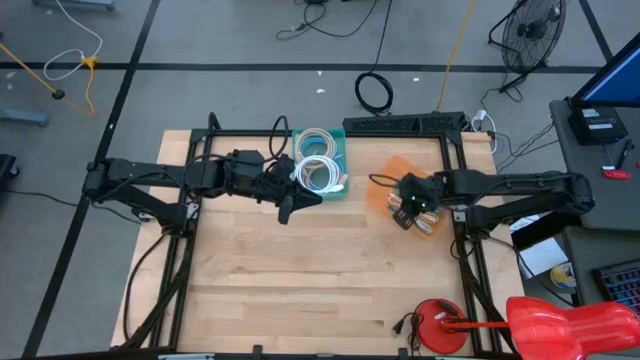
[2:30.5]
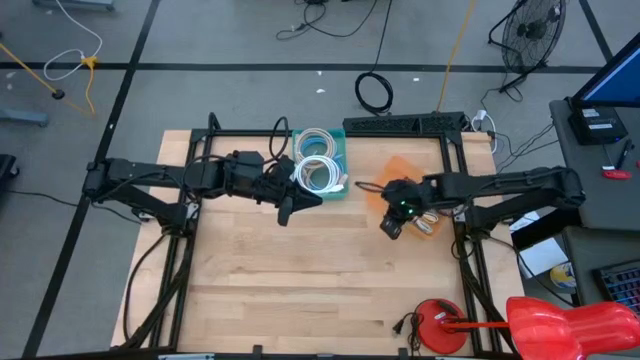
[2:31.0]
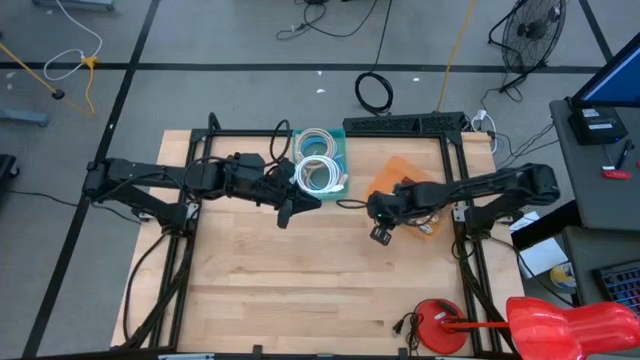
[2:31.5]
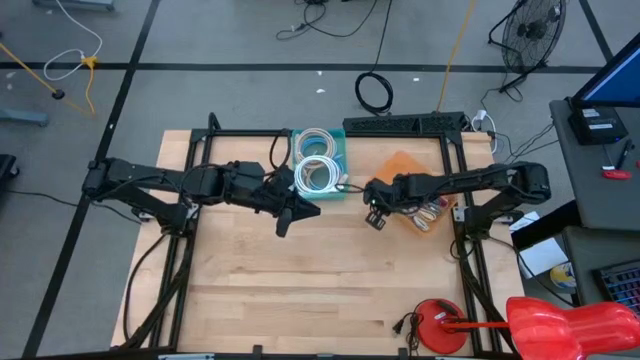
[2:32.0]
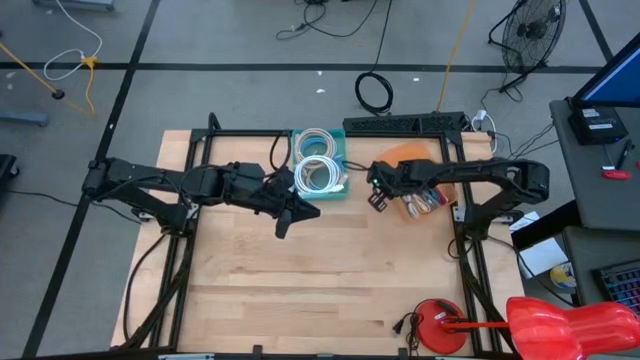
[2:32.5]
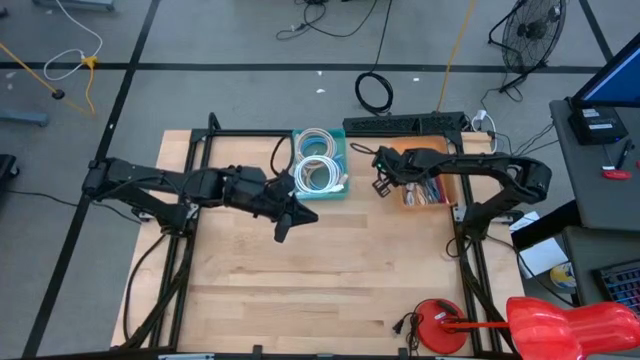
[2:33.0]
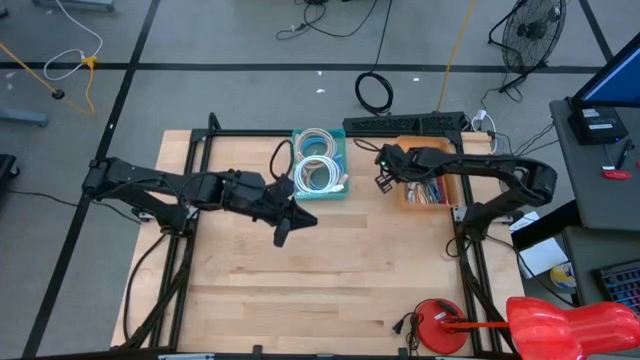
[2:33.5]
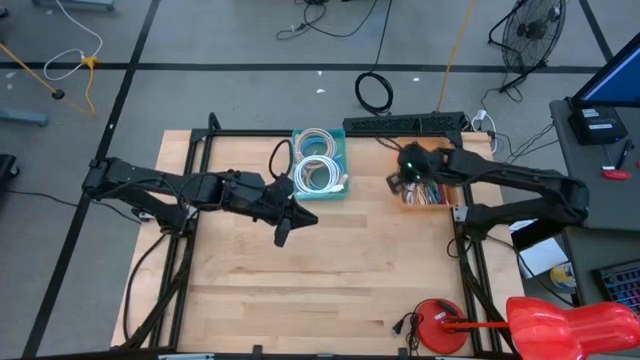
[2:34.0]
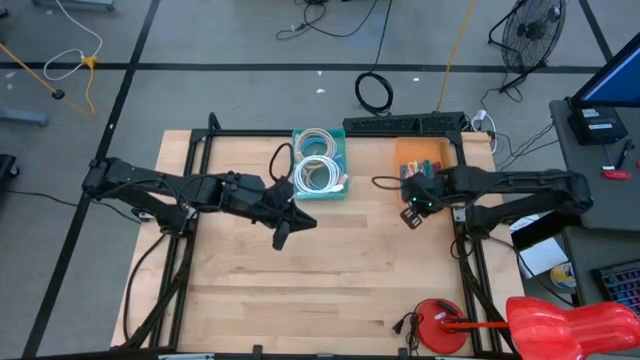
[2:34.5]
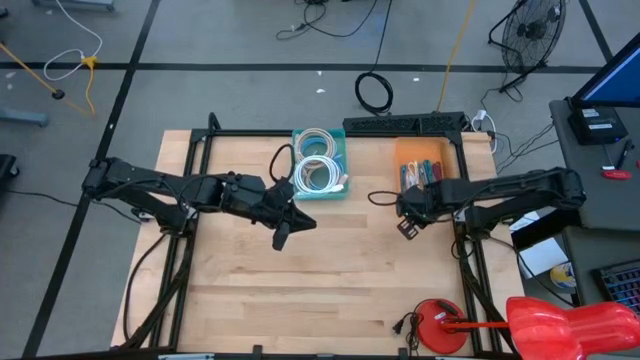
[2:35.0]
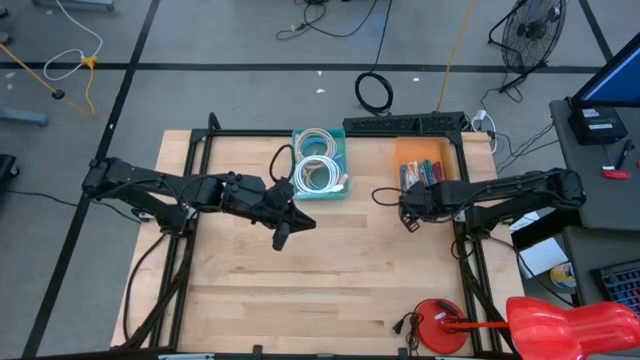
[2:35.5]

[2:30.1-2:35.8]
Task: Pick & Place USB Port
Adjust the orange bin

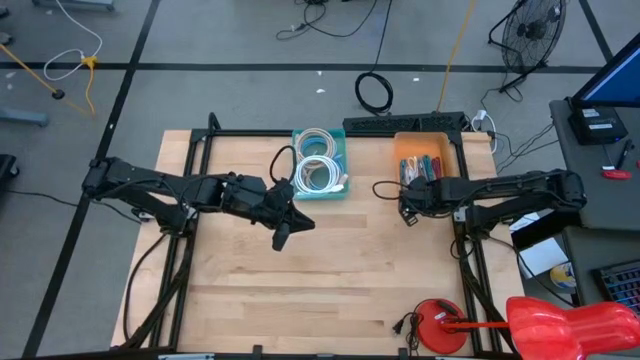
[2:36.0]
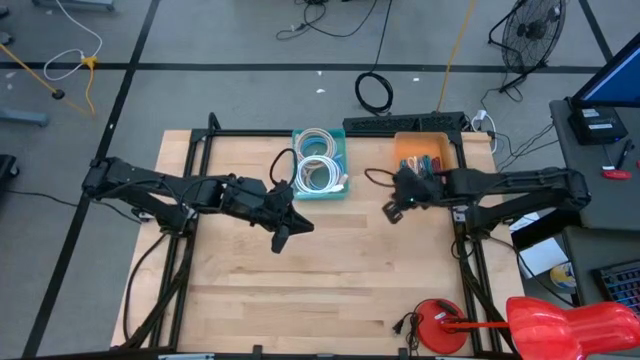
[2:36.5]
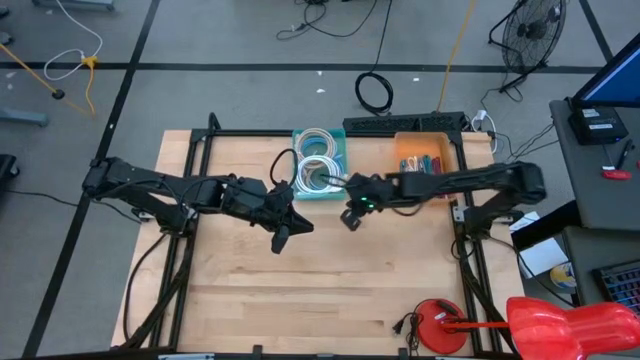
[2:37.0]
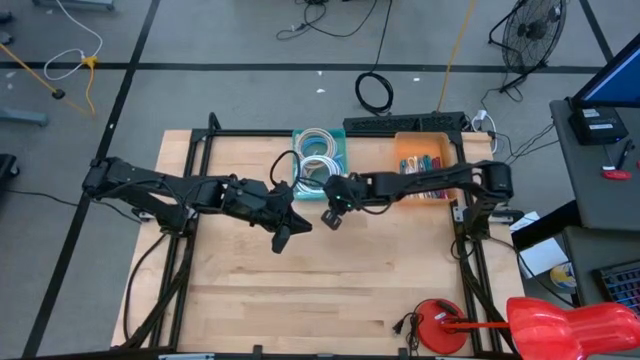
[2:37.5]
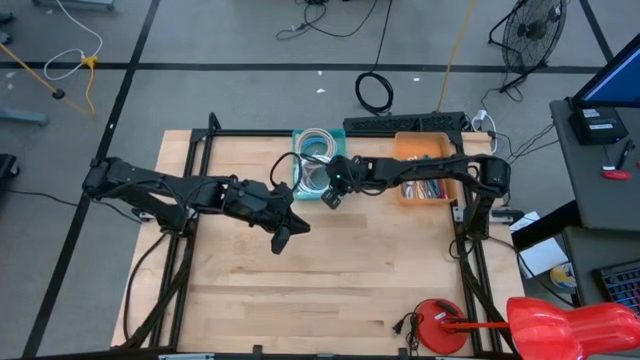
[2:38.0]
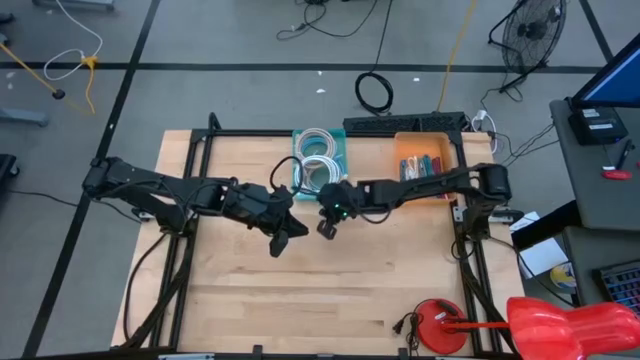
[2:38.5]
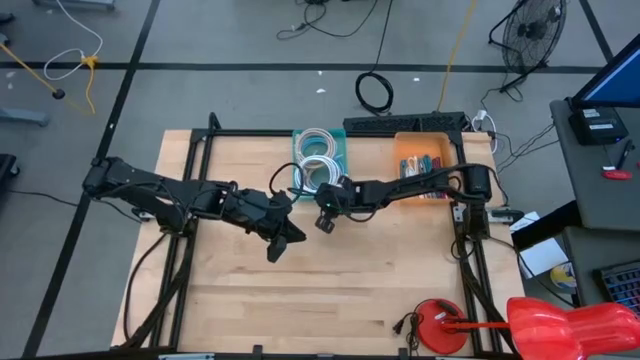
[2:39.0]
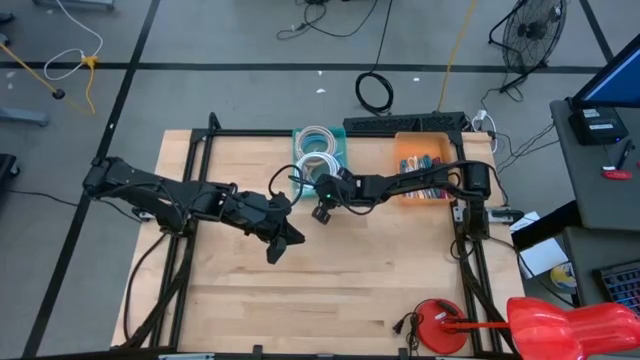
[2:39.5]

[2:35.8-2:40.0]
Adjust the green bin

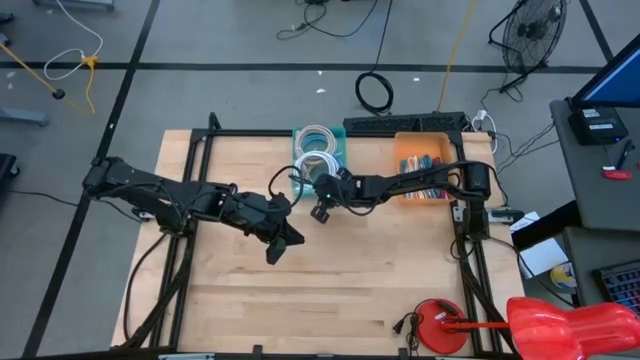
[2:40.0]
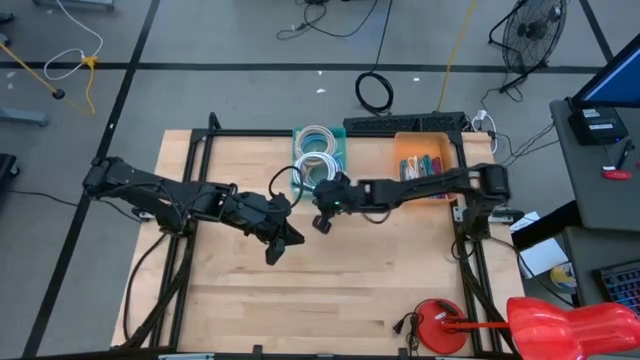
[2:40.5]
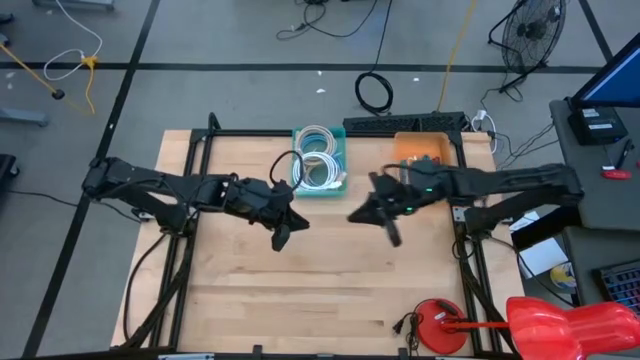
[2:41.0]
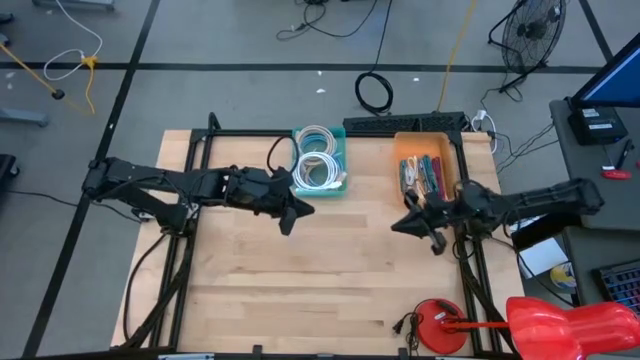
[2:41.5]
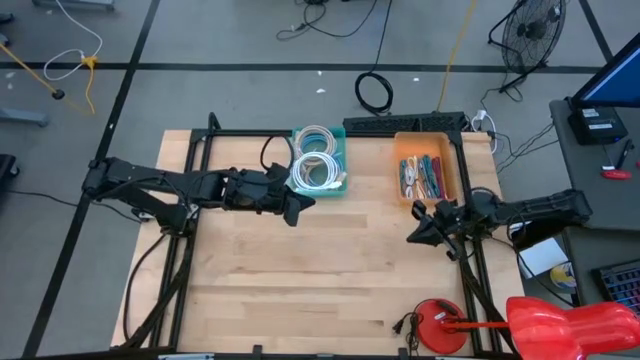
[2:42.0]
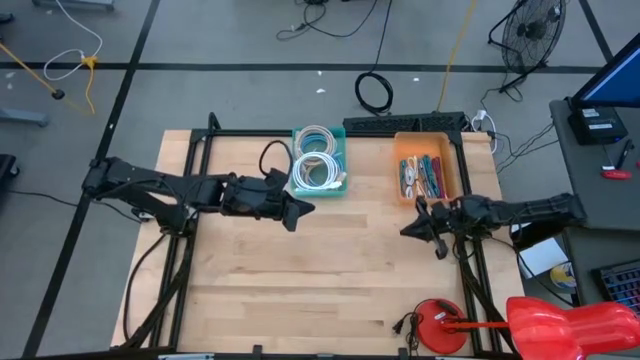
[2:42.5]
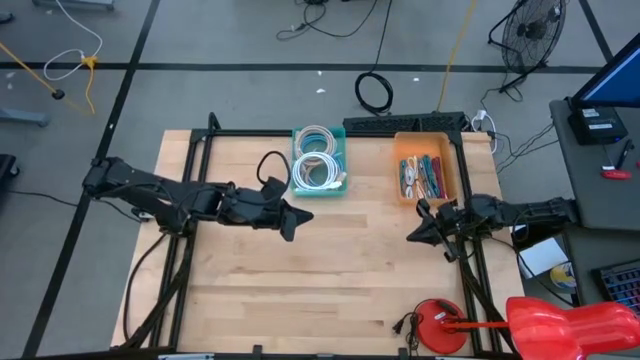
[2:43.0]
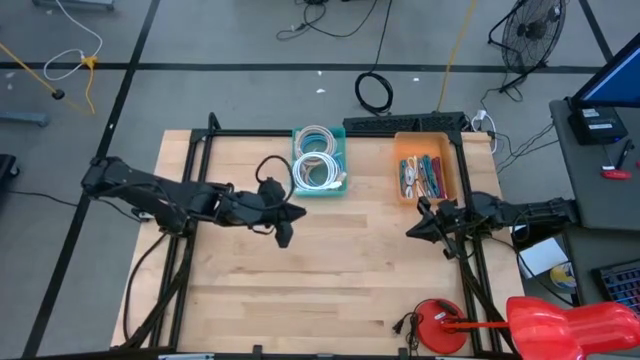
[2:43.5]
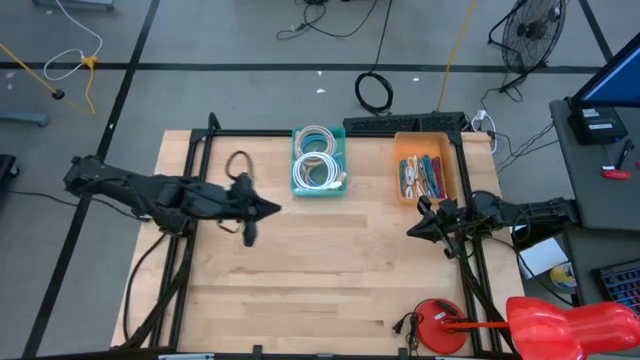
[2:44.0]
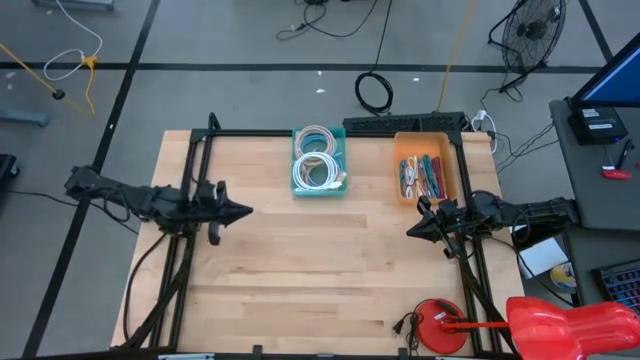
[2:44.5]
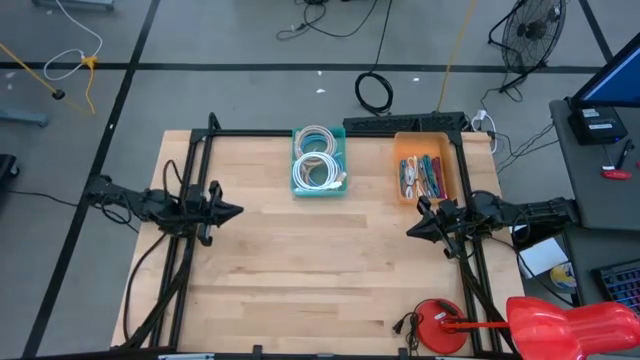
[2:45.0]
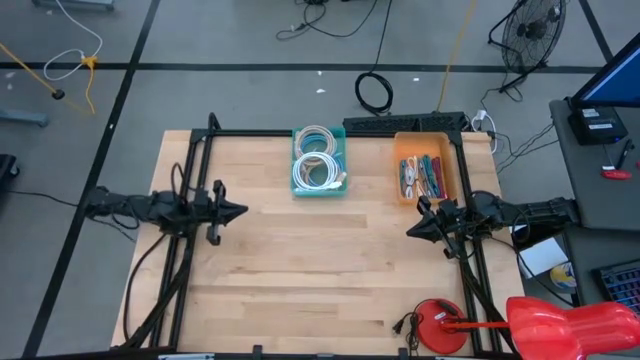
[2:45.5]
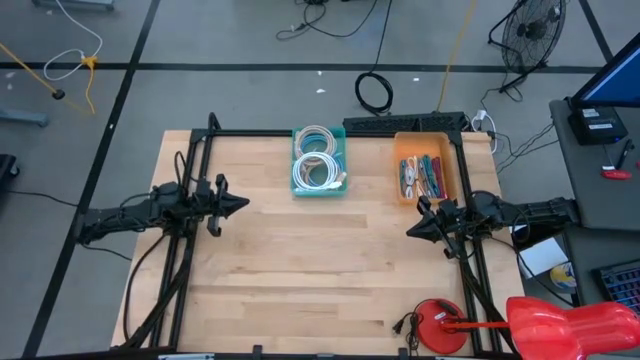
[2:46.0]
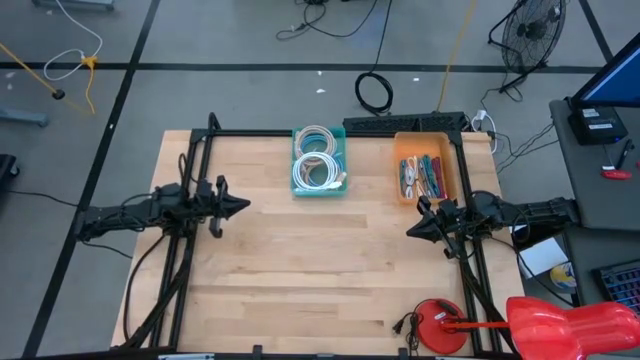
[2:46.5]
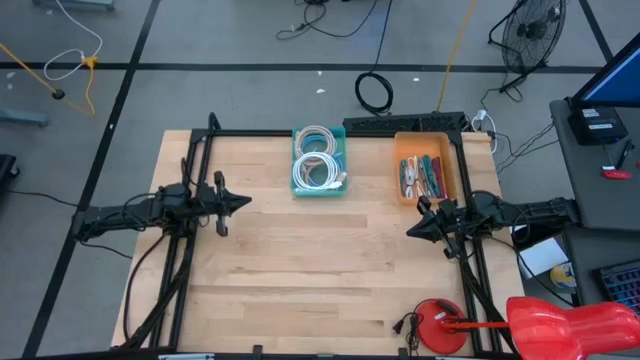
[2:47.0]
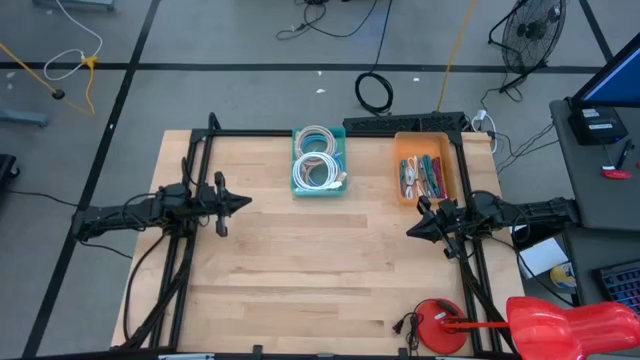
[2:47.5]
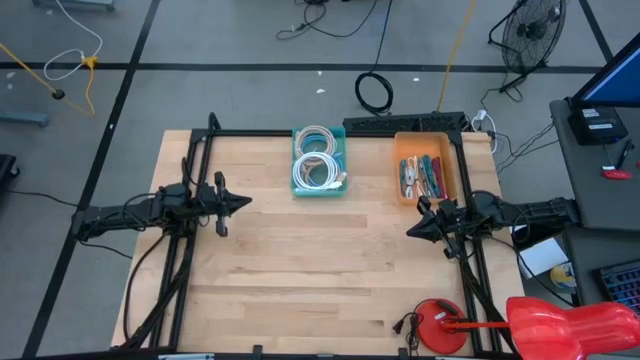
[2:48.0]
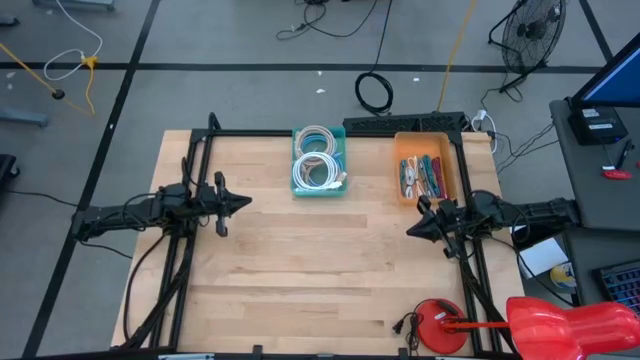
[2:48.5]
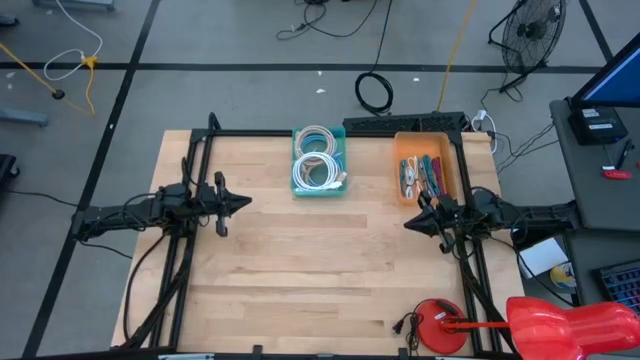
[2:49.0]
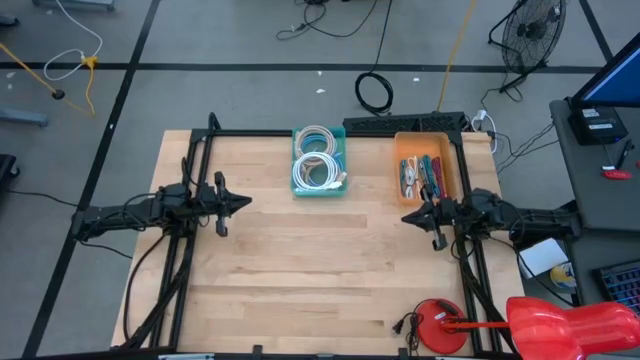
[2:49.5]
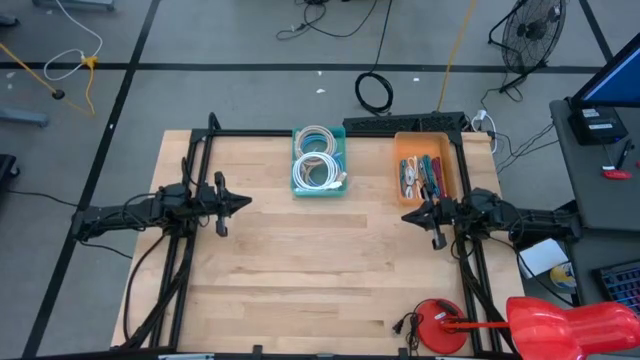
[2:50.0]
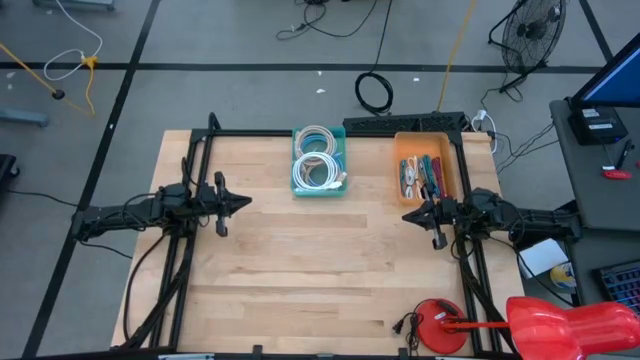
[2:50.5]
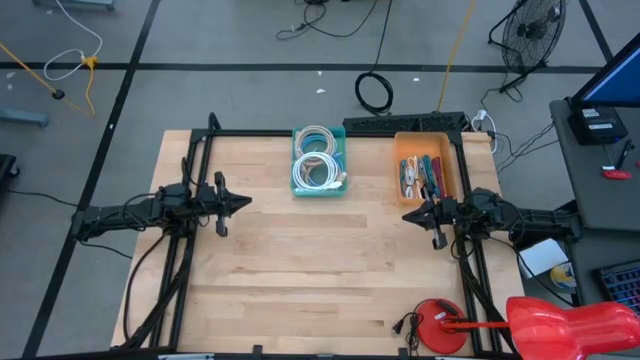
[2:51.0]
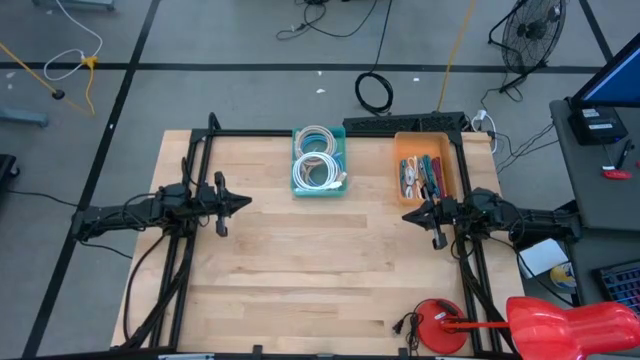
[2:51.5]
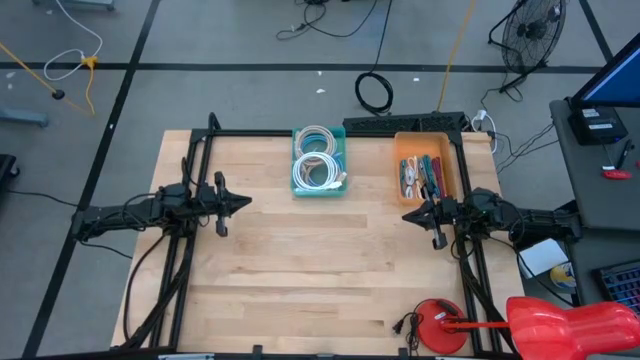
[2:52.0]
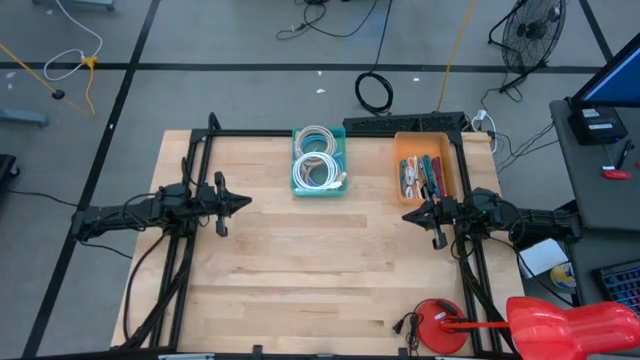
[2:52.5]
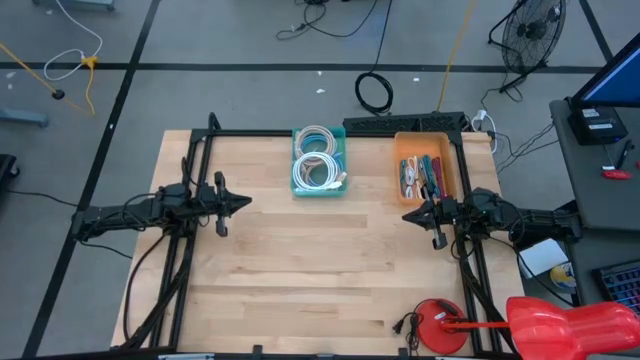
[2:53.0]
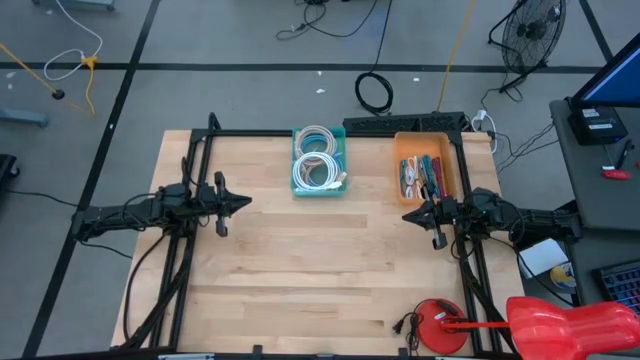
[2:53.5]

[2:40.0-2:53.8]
Return to Home Position
